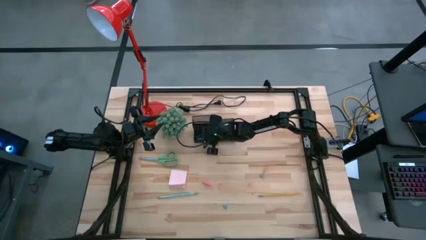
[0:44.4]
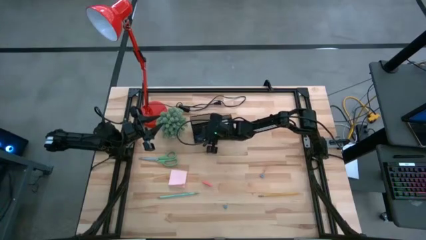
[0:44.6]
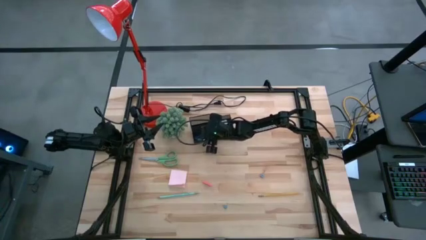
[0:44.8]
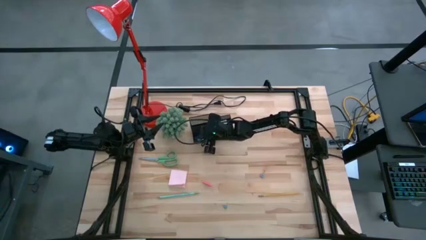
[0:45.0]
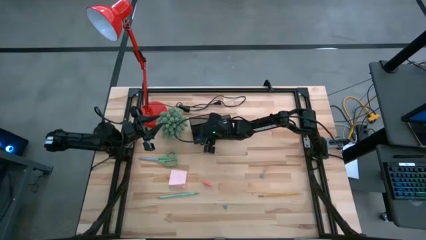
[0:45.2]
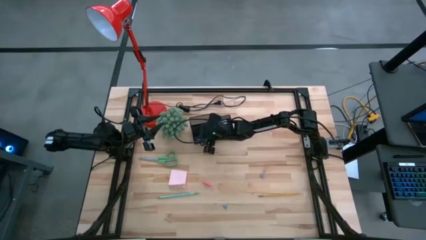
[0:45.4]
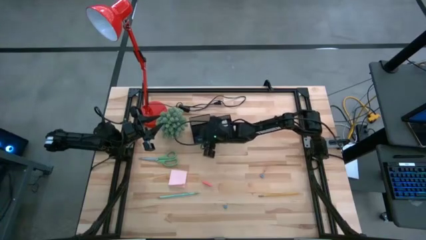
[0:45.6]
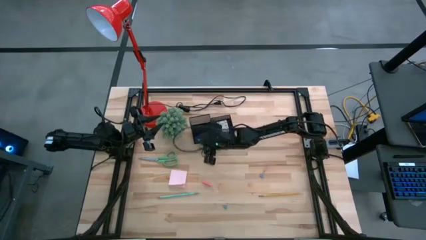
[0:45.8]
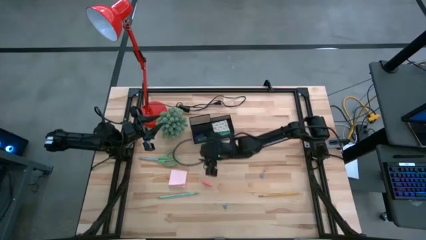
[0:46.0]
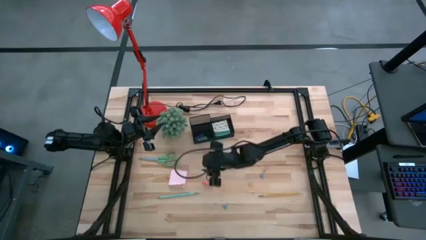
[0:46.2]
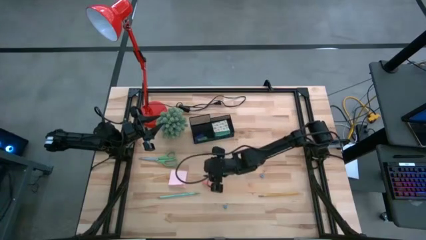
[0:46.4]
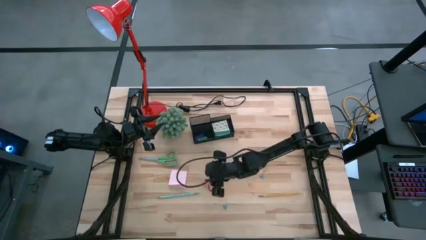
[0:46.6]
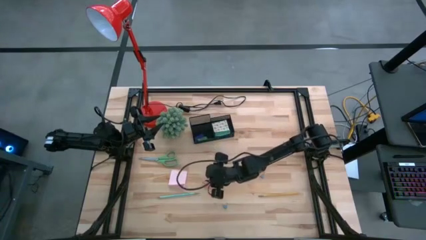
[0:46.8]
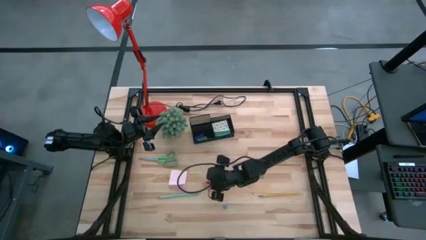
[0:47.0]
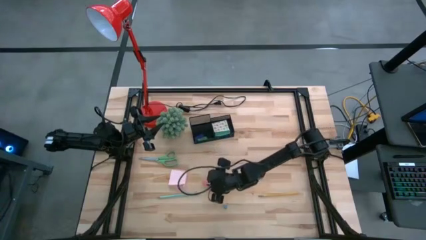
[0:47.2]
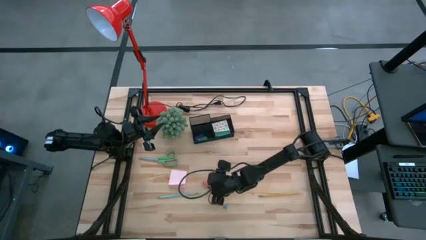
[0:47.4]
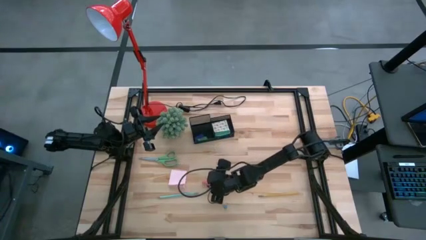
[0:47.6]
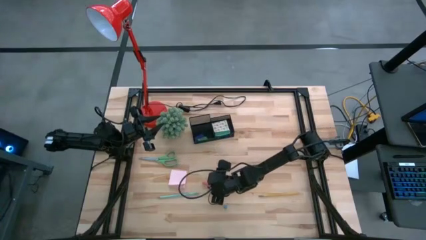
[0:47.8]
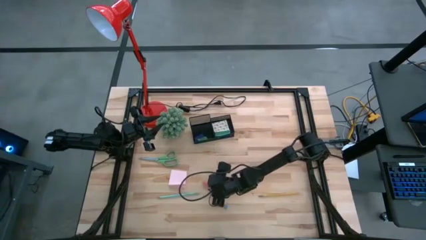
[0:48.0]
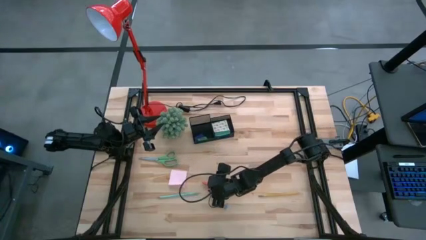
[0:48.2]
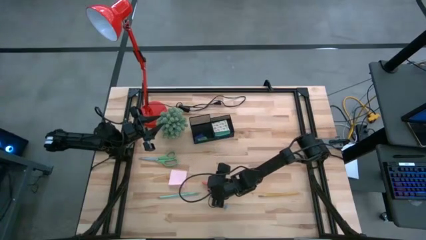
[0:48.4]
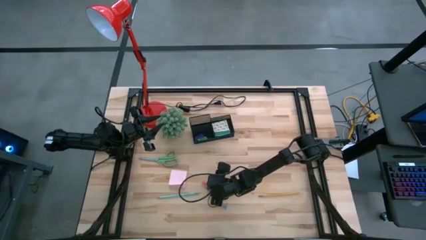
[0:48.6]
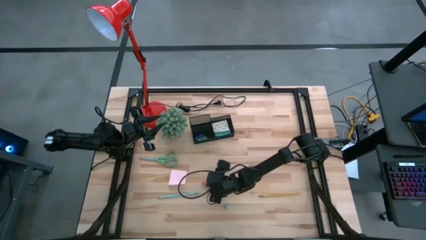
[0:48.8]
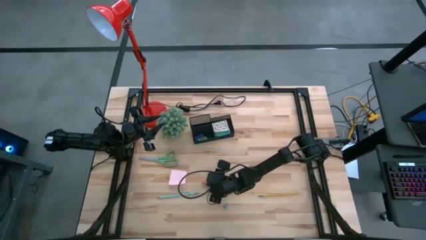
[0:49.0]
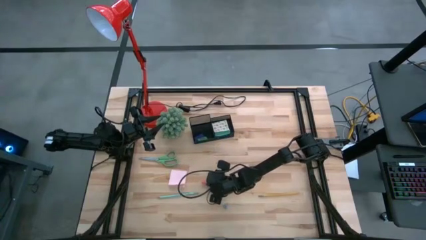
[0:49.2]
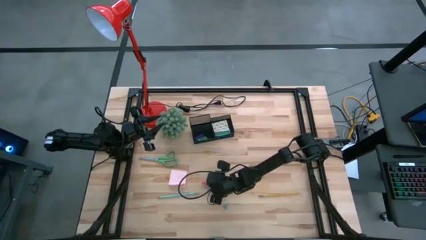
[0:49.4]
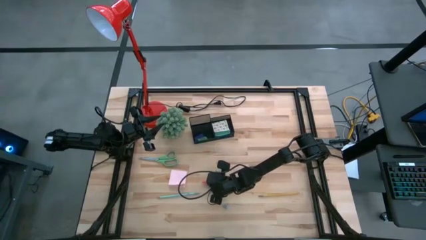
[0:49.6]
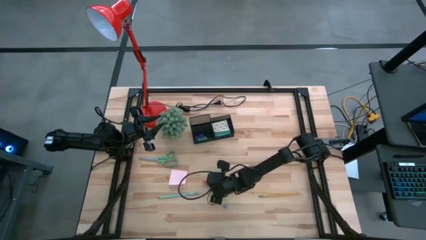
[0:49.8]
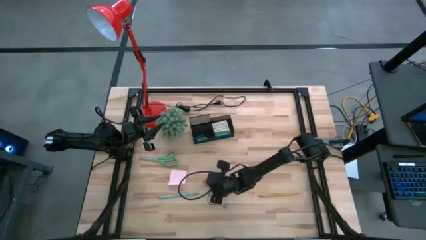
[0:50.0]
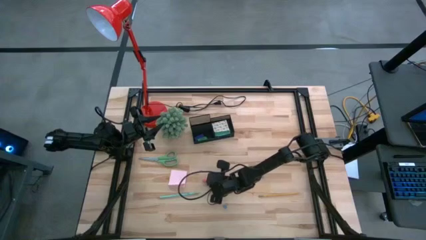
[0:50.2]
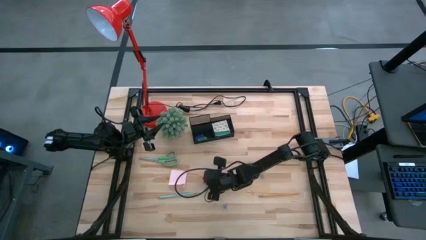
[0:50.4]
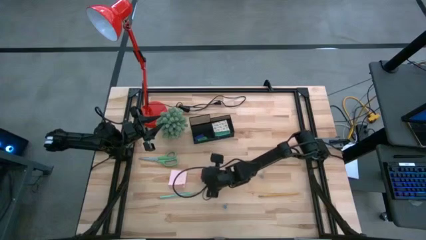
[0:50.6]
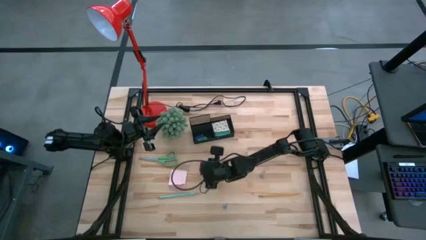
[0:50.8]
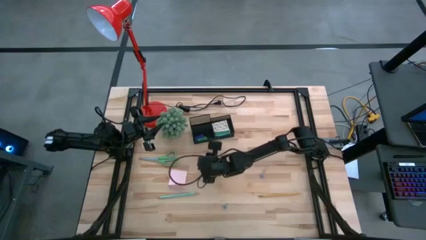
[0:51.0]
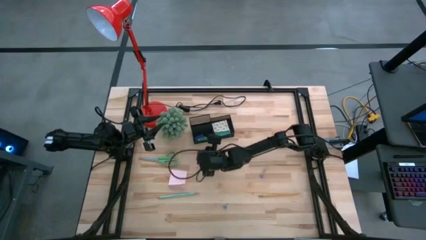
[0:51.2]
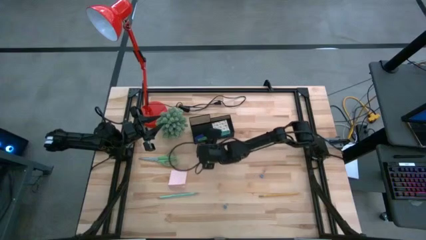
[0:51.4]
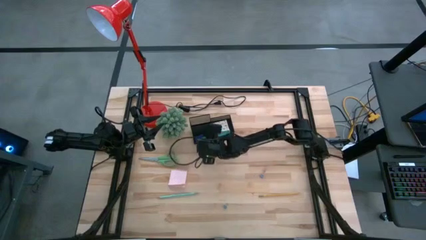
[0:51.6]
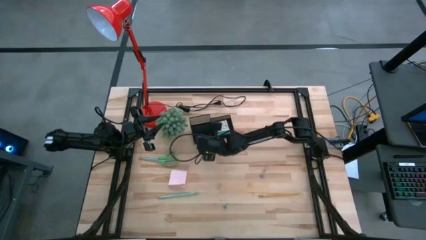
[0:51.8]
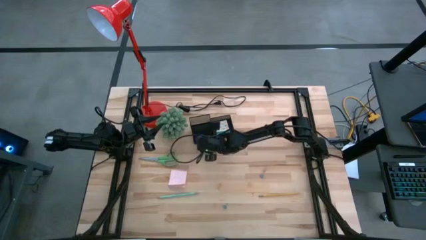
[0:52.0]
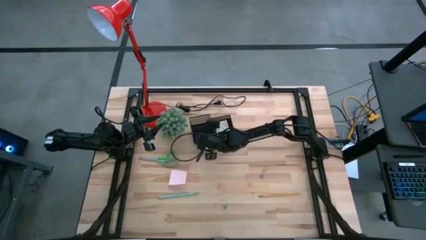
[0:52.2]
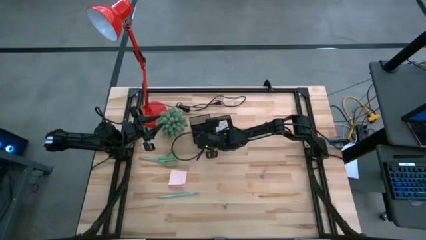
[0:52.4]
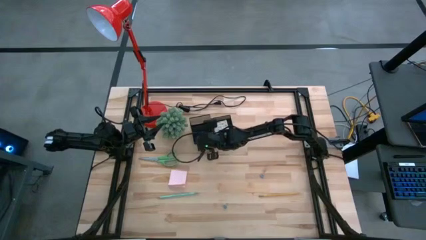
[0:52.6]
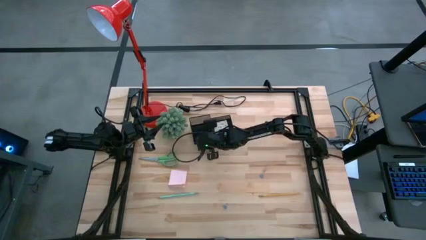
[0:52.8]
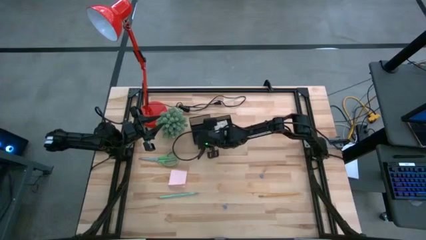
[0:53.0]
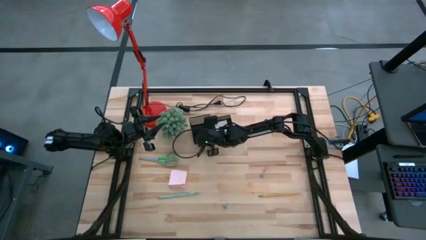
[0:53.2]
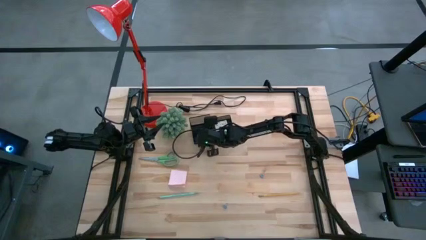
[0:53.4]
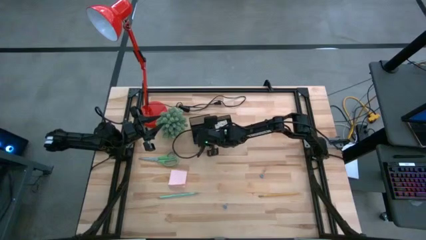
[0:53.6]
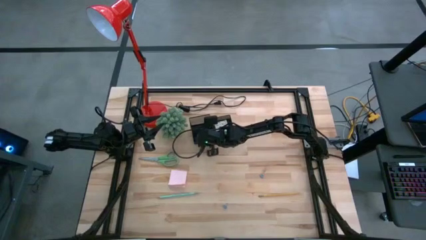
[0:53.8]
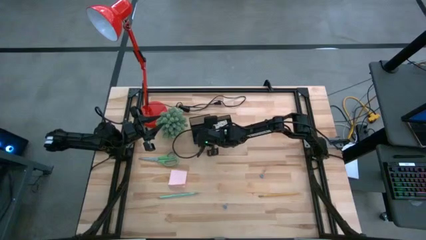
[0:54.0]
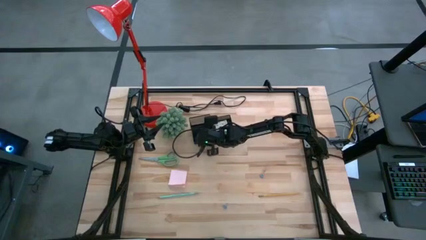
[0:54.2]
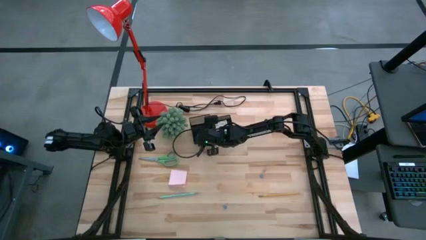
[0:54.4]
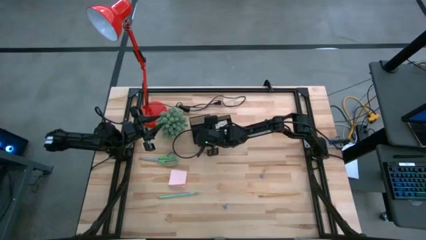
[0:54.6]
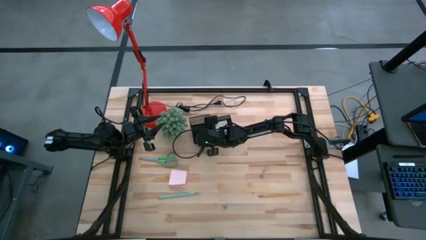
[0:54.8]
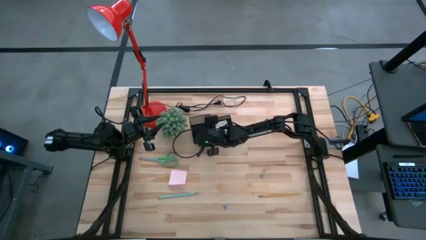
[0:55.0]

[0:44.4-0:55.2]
Task: Pick and place office supplies into organizer
Put the pink eraser into the desk organizer

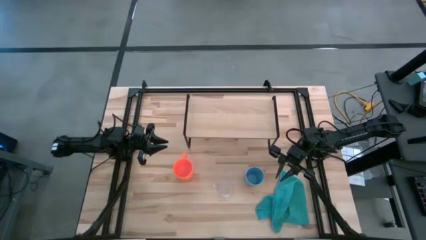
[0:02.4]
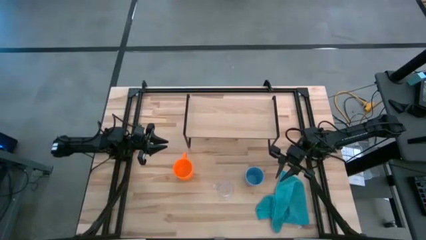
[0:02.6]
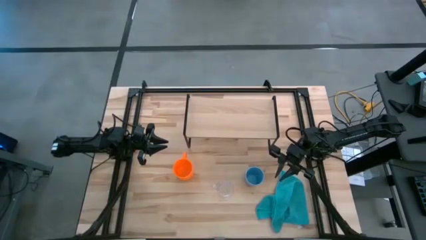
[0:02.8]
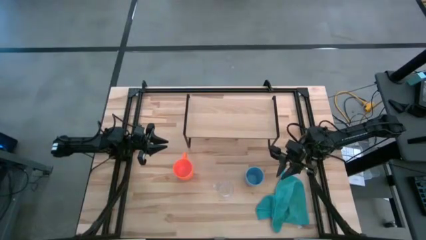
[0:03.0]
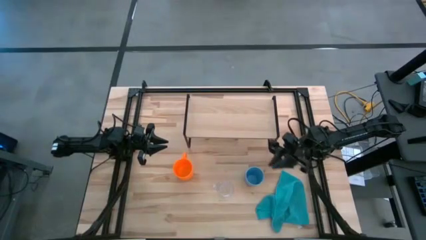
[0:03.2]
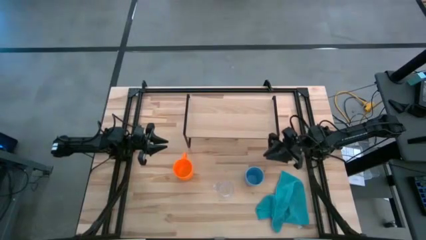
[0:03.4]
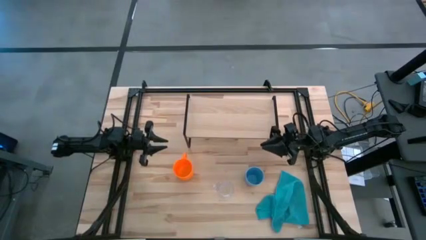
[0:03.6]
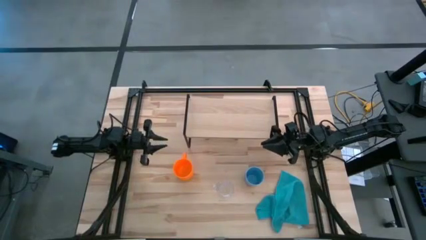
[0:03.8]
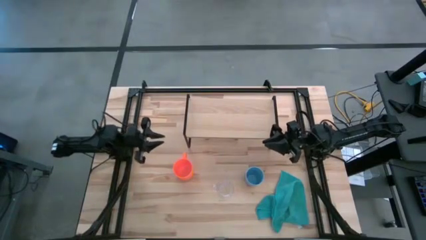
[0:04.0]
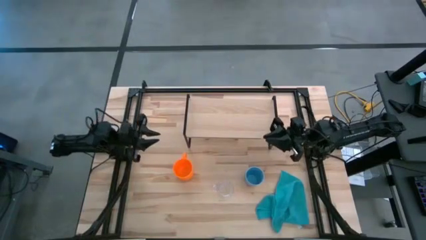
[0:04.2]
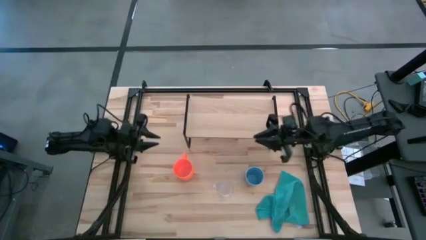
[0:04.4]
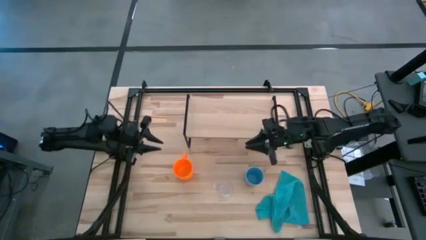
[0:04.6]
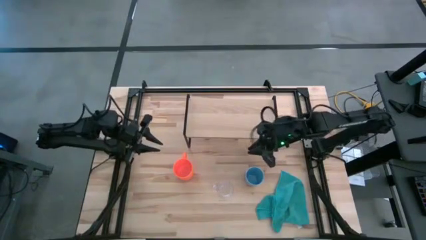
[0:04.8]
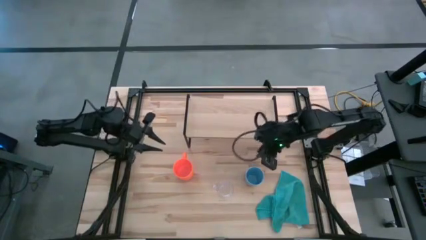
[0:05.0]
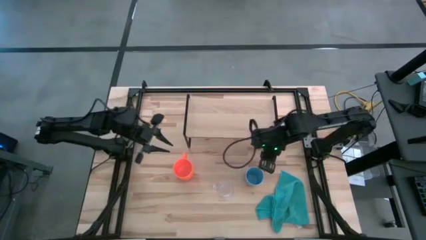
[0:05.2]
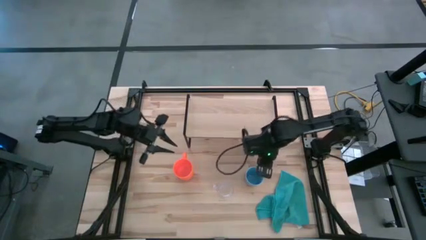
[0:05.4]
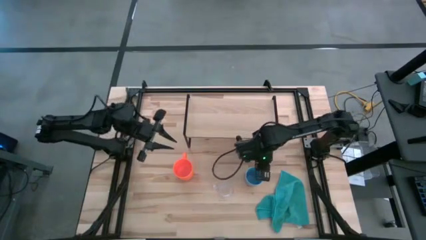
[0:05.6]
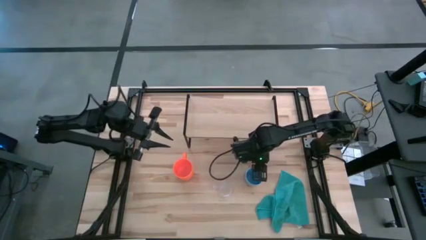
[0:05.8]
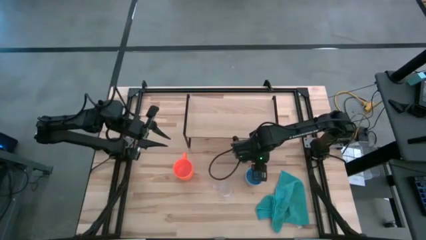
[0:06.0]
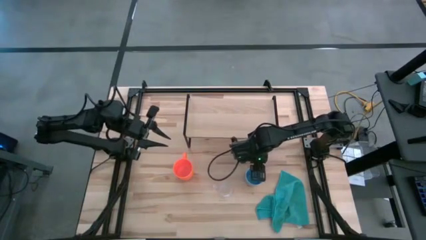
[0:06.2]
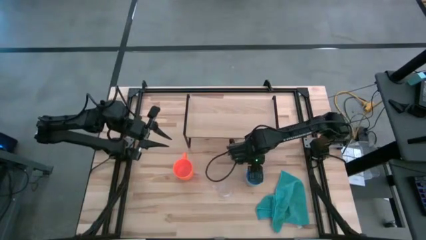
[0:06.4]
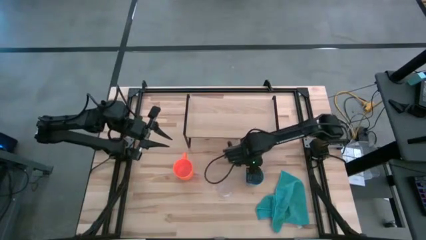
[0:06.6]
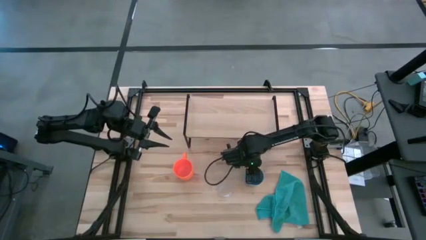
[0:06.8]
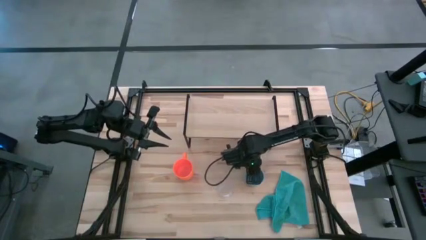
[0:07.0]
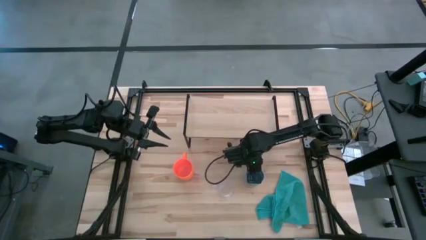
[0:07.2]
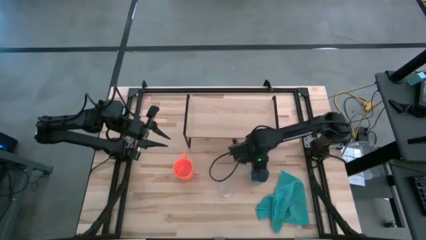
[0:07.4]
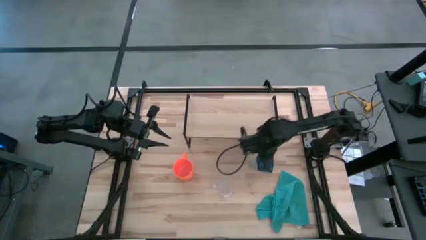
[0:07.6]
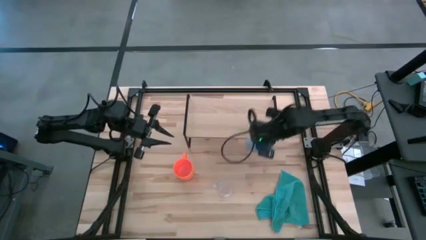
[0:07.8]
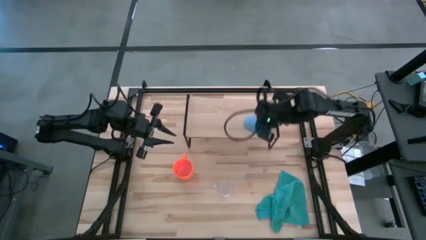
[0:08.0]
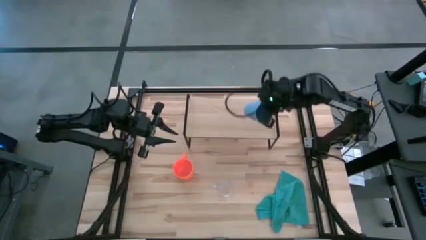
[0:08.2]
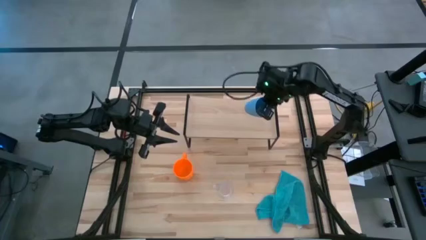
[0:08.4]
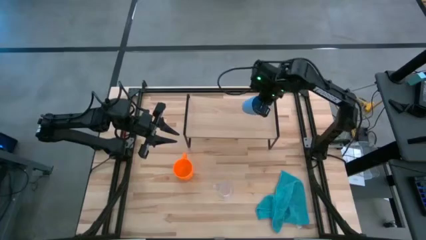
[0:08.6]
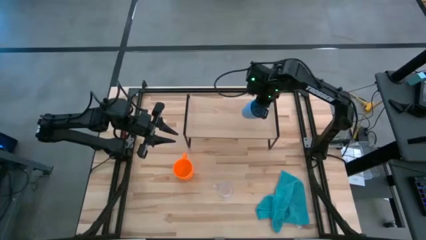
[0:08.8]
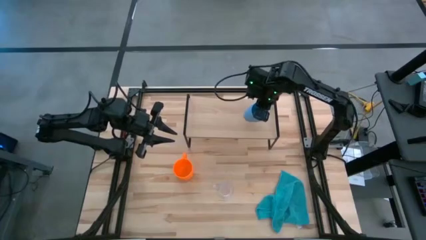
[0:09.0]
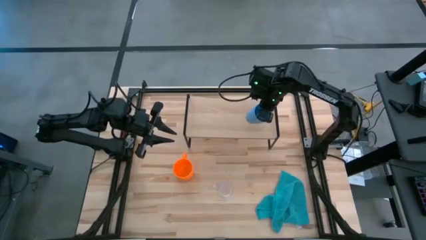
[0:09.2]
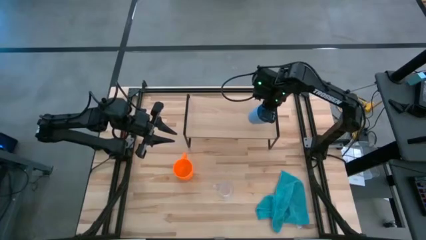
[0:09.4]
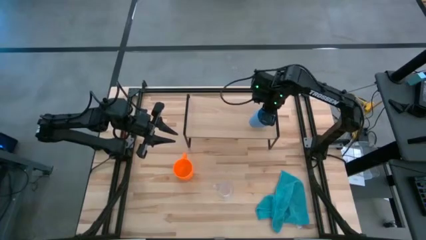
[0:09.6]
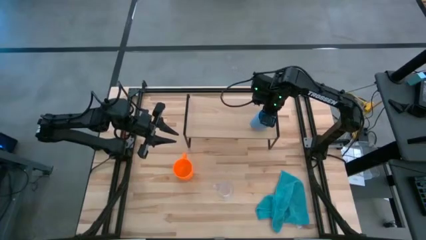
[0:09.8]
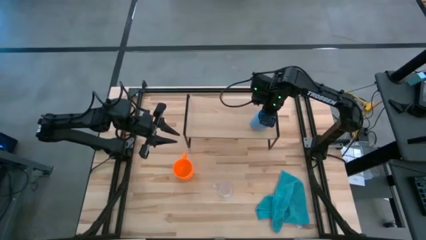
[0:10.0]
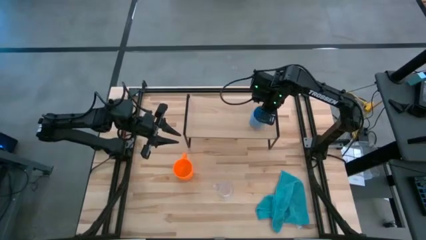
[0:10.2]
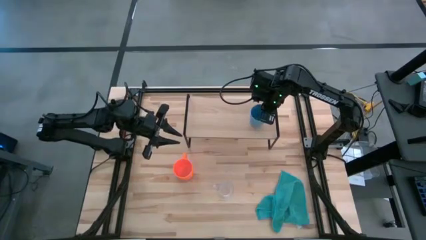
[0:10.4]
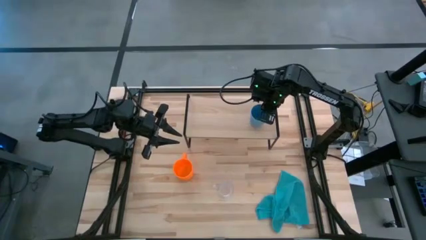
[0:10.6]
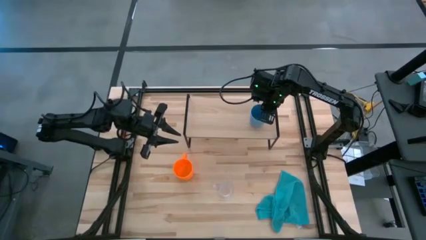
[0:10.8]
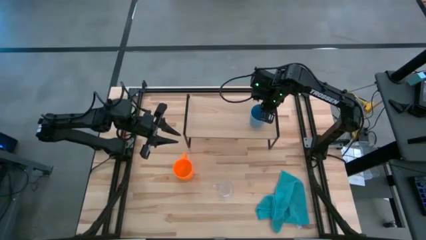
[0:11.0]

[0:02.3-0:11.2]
Task: Stack small to large cups/mugs on shelf
Put the blue cup on the shelf
